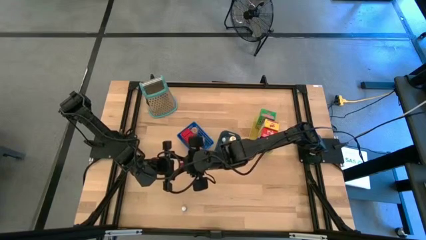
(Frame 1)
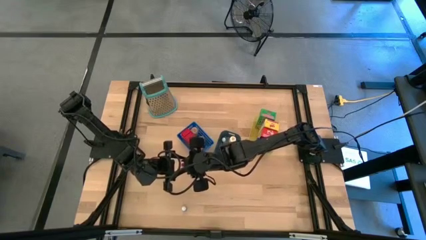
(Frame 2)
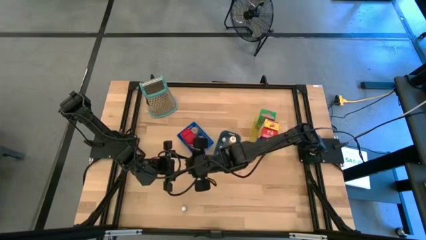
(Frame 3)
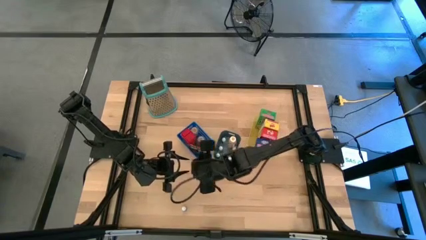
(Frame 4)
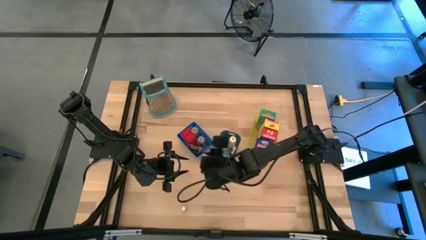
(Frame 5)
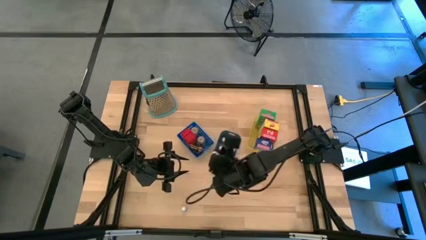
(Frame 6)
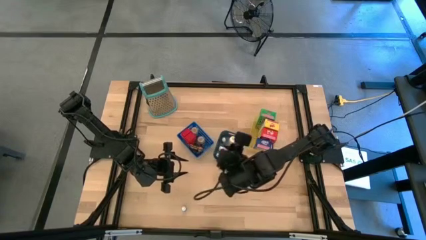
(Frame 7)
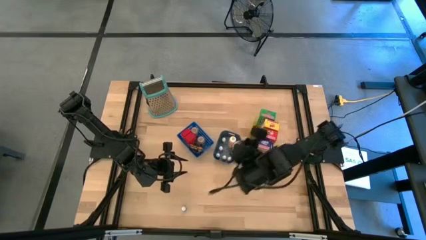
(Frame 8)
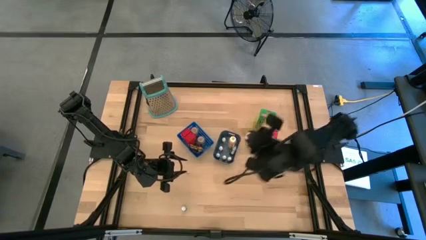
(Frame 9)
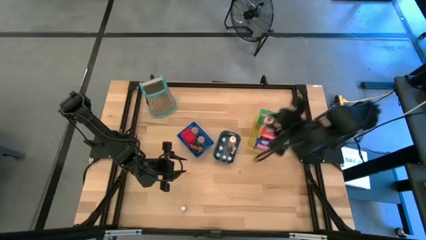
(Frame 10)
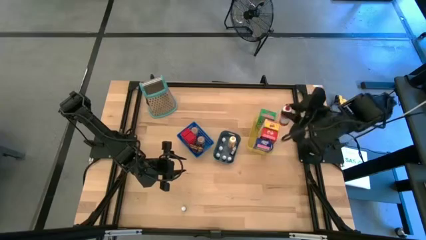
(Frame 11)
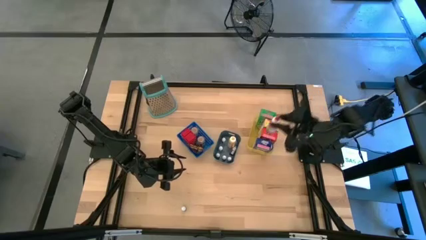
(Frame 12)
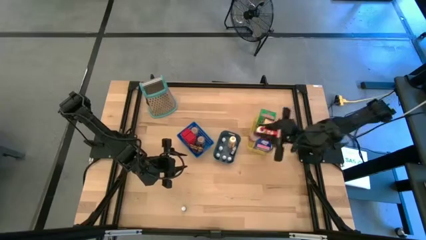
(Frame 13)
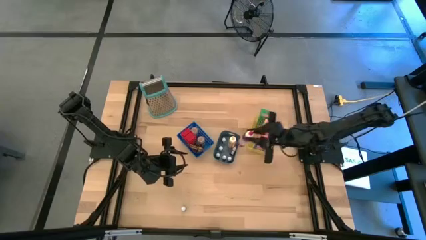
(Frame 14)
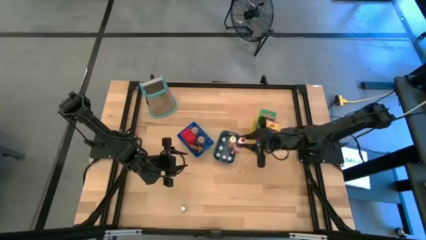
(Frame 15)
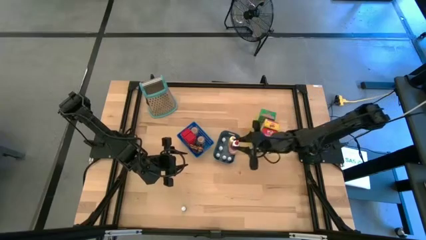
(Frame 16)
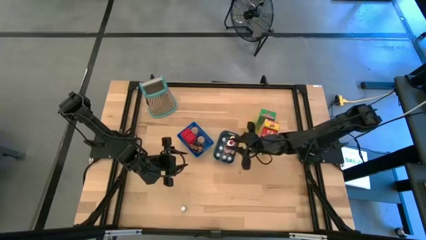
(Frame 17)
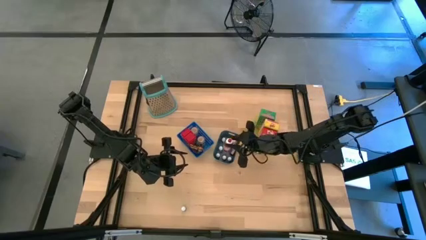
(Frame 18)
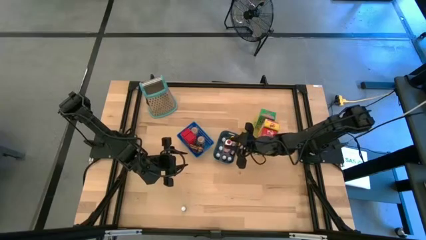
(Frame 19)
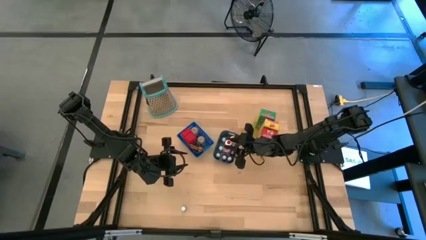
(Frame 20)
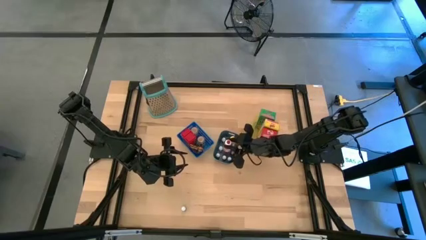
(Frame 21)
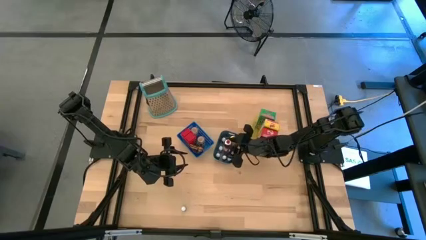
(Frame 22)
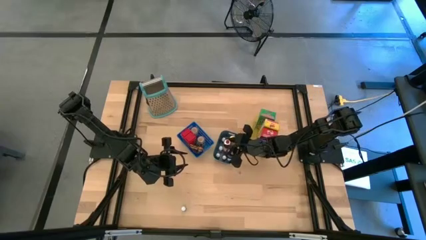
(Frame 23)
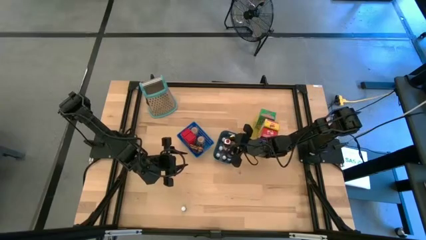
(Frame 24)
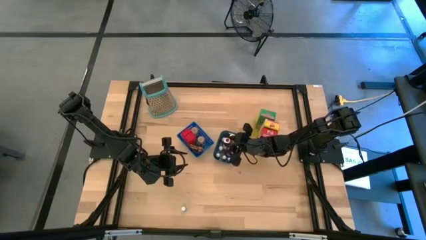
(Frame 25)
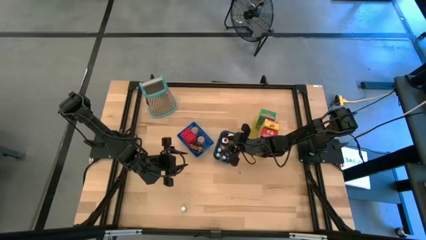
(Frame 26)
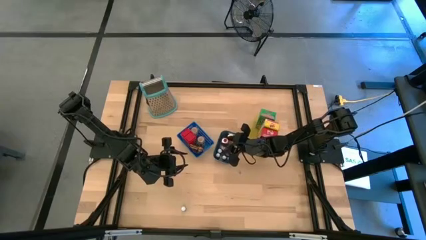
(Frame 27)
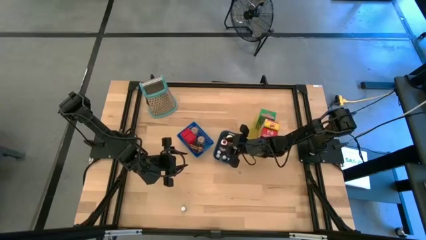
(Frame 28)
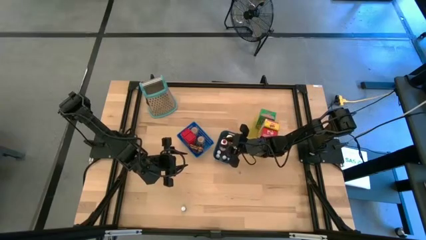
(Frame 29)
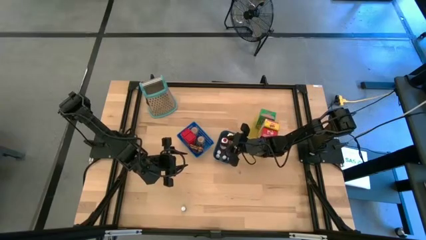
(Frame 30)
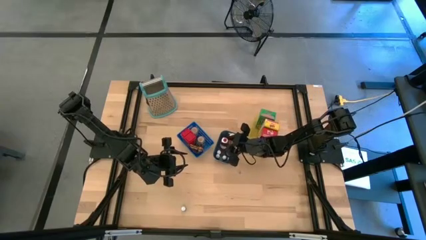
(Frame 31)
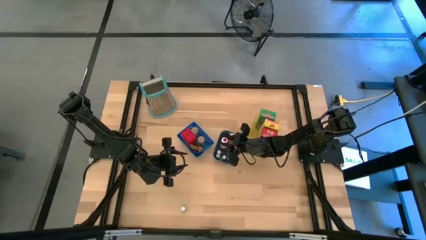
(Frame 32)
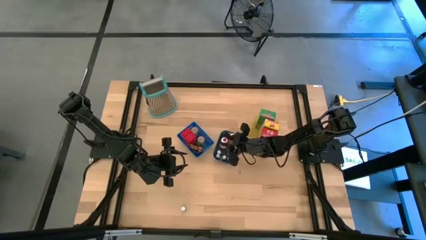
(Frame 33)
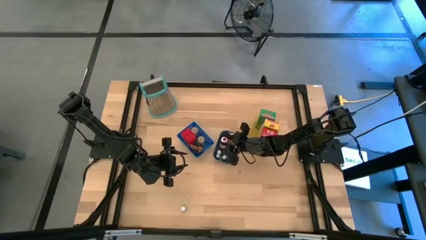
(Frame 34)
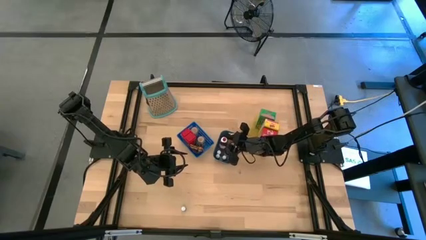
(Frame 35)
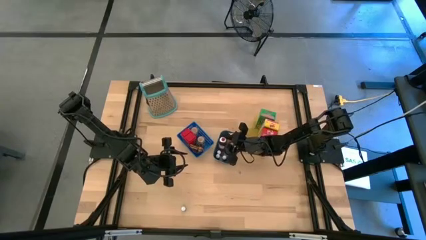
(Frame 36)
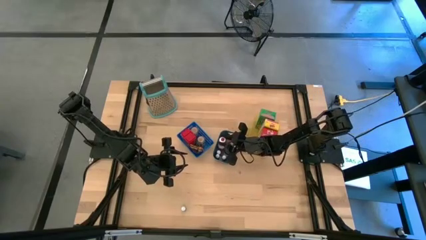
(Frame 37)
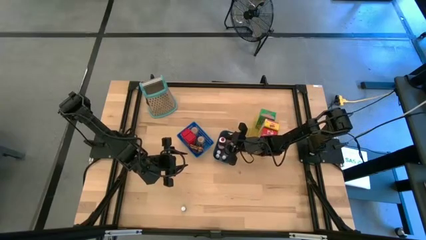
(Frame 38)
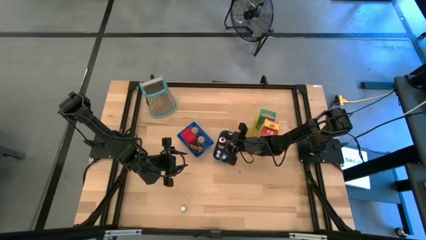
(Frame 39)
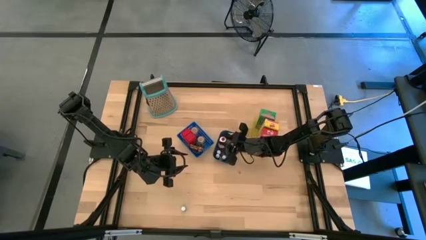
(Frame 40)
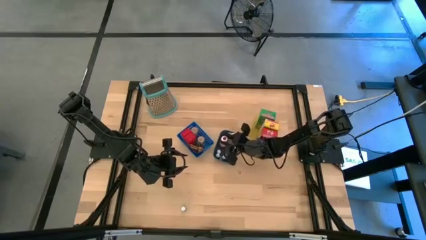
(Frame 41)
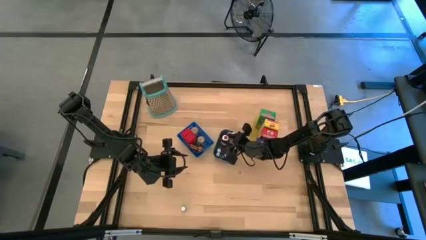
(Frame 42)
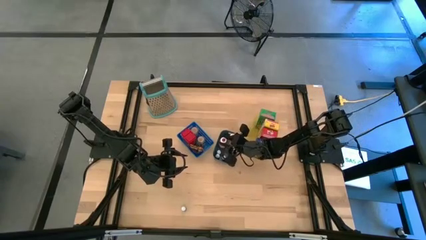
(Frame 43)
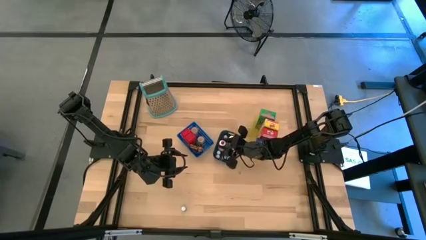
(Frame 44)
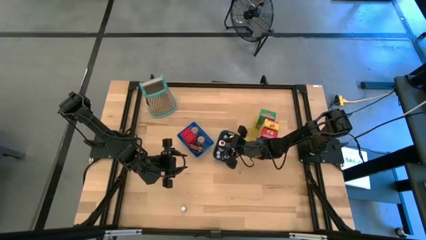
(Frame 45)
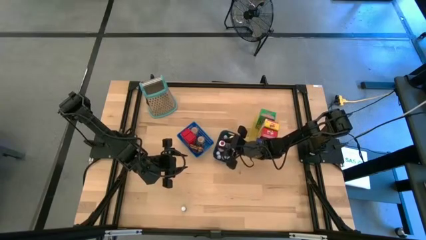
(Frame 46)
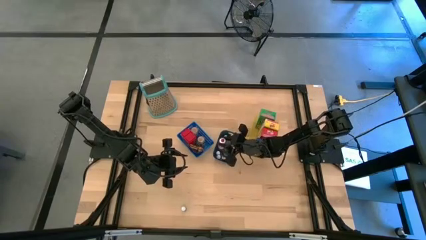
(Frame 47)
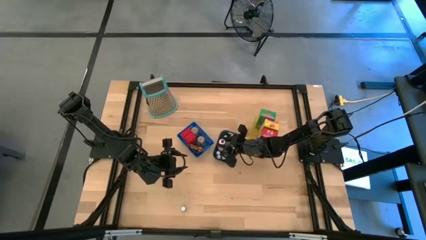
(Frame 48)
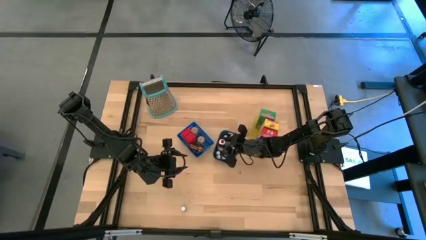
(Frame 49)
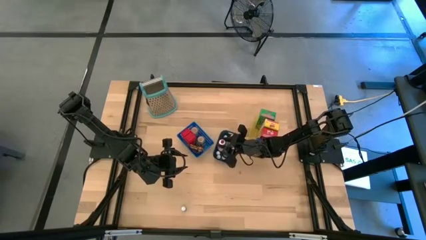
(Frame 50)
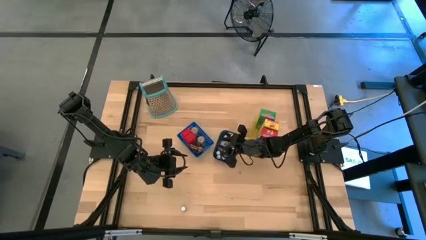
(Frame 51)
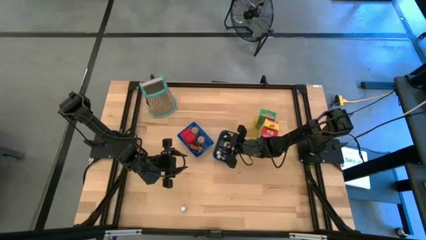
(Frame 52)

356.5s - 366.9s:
Task: Pick & Place Kitchen Items
Put the red food coloring bottle into the green bin
